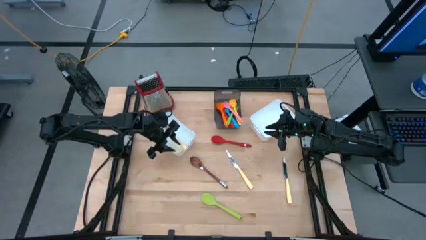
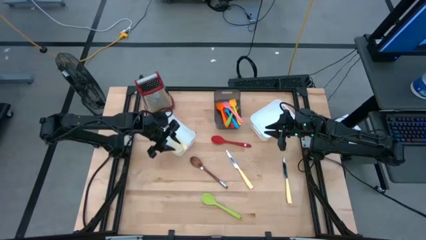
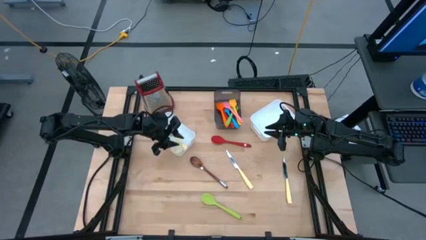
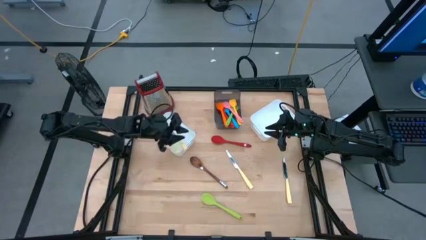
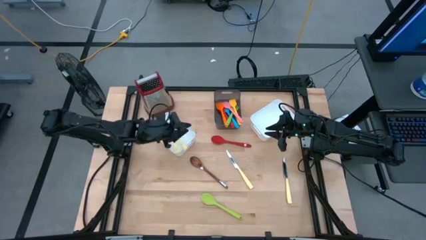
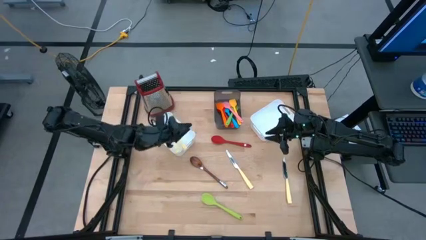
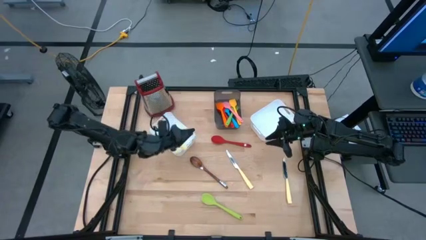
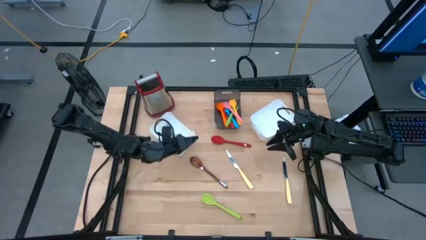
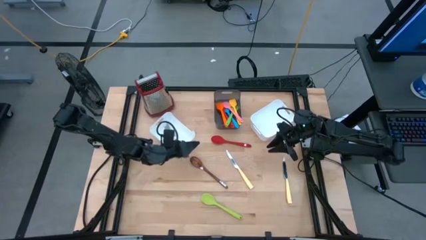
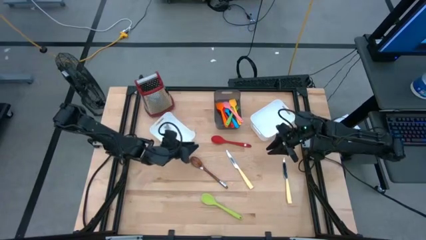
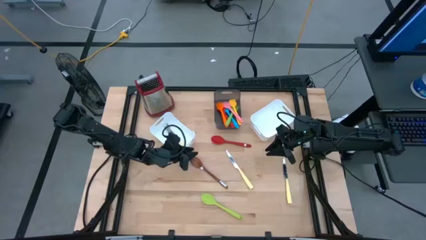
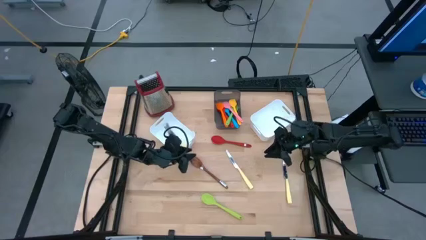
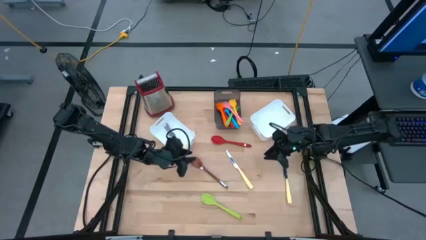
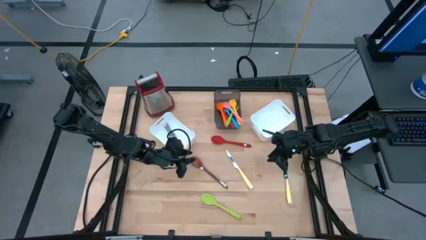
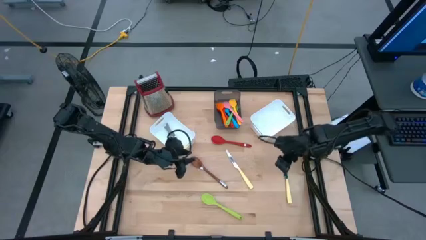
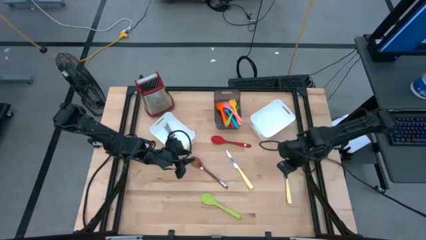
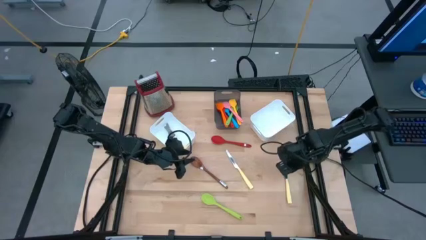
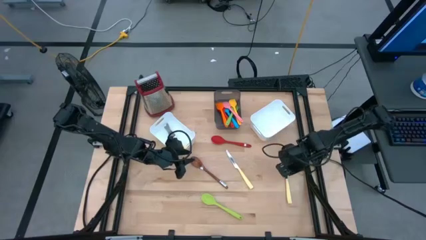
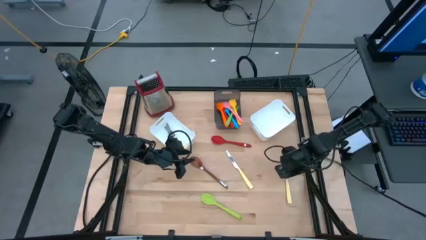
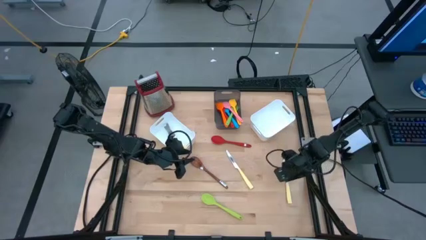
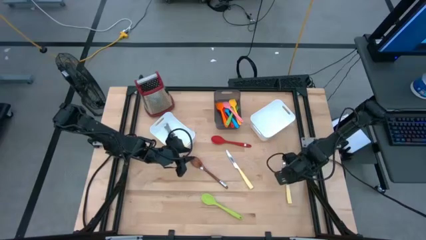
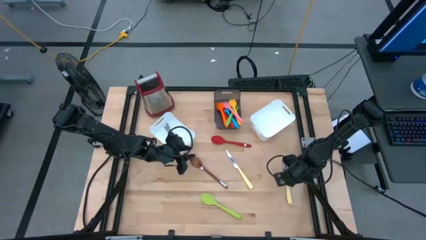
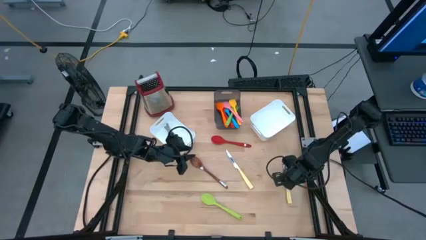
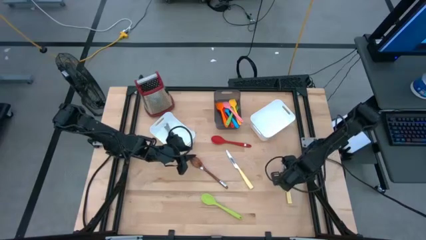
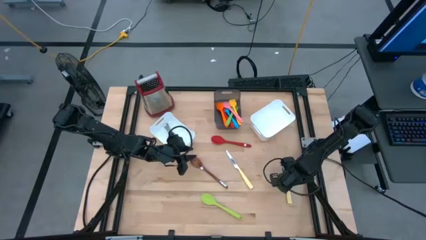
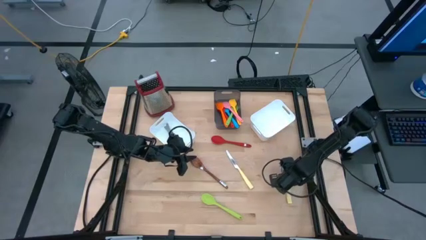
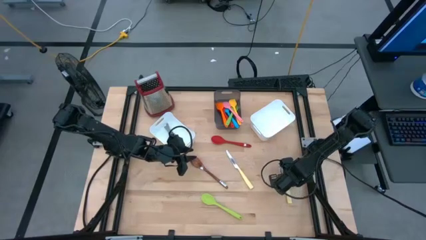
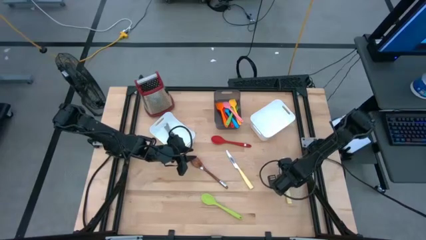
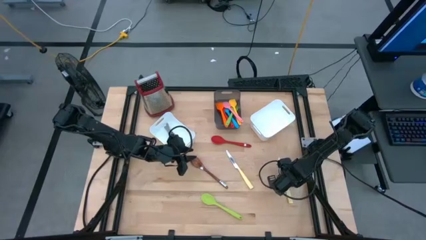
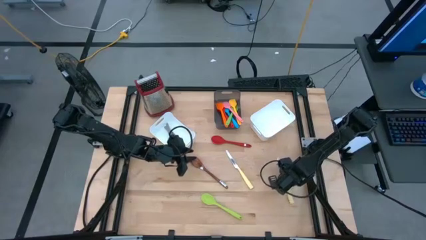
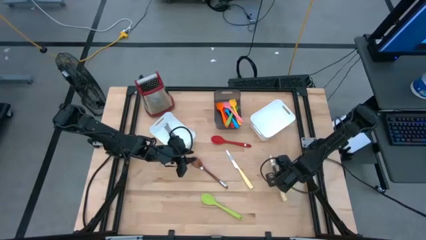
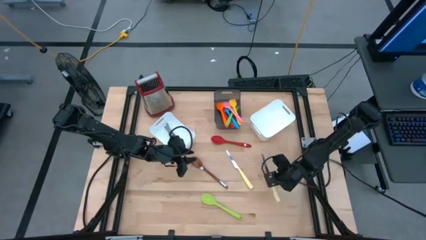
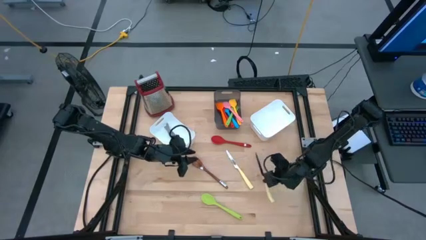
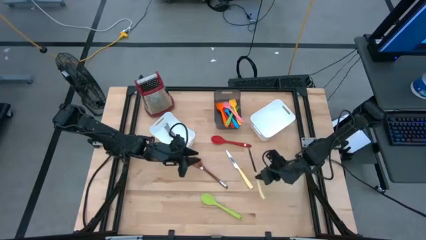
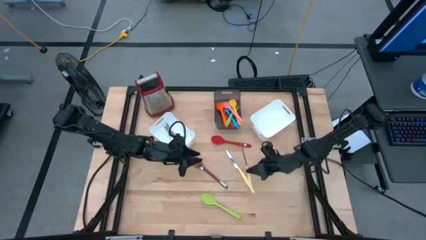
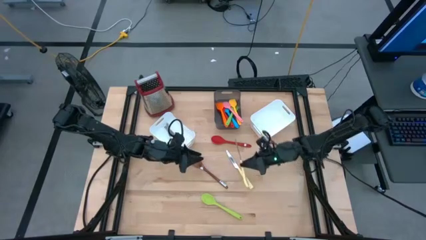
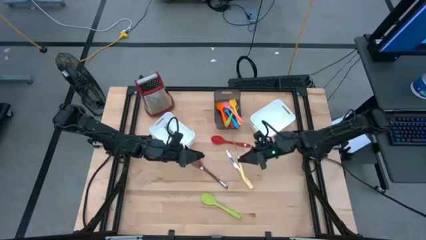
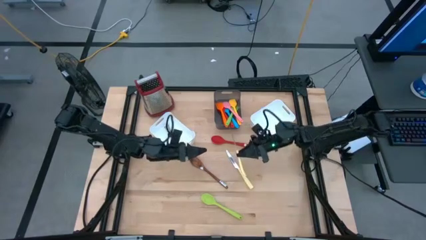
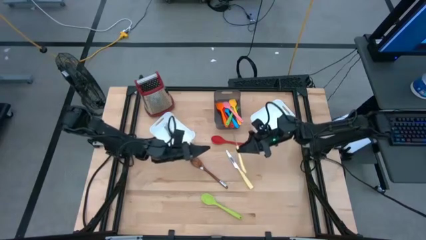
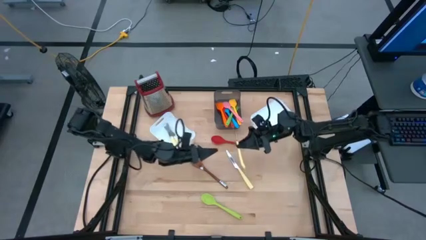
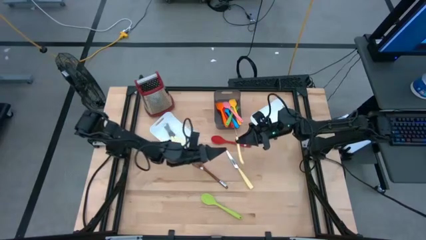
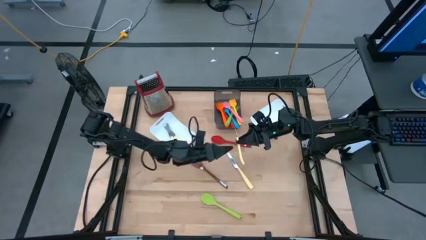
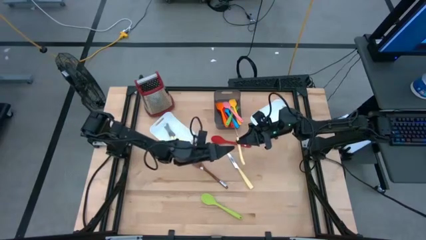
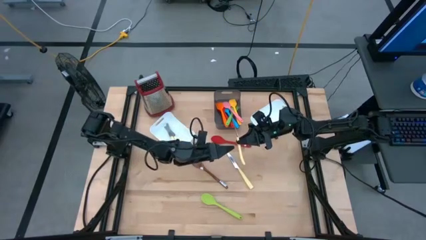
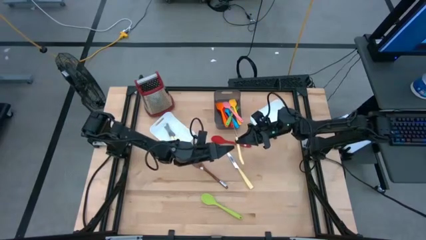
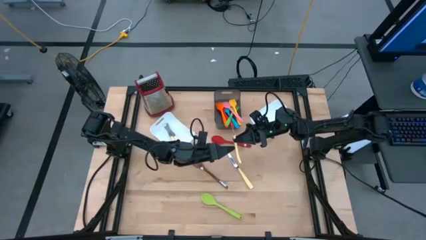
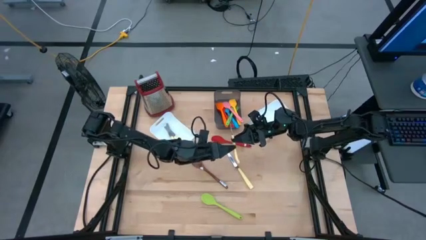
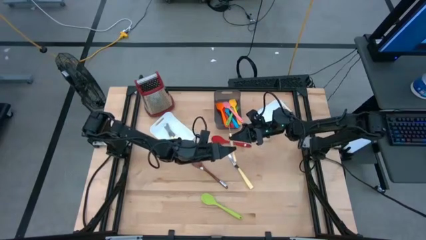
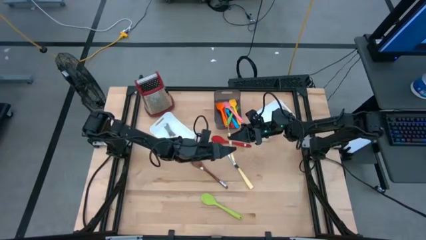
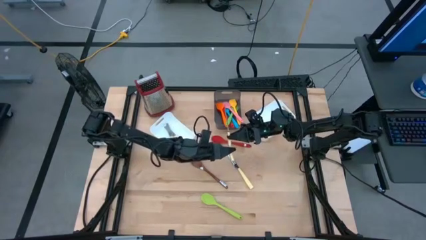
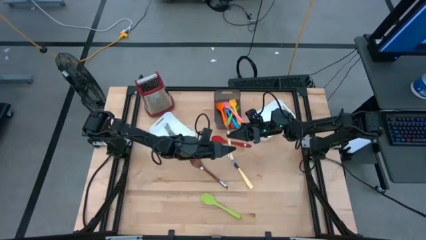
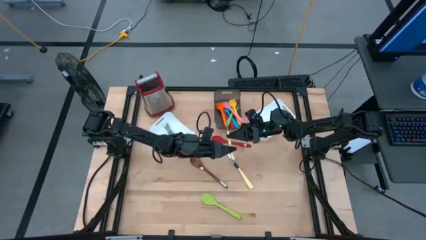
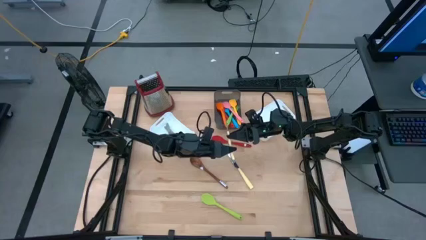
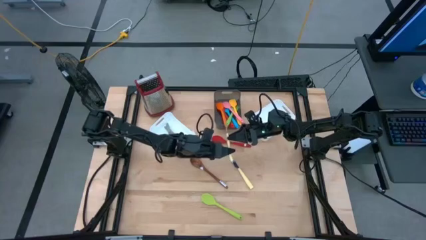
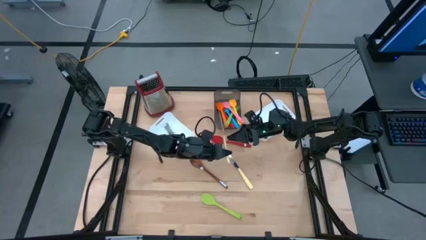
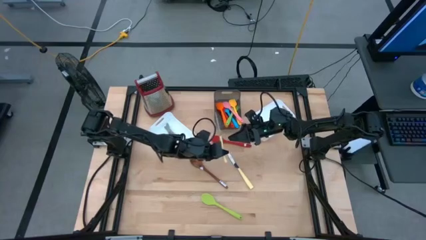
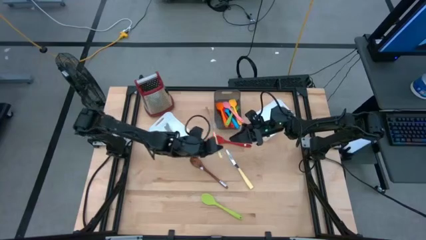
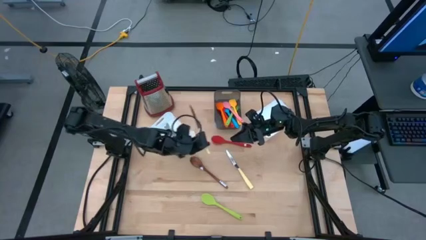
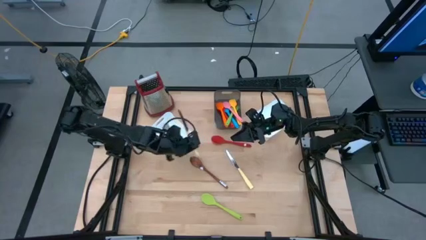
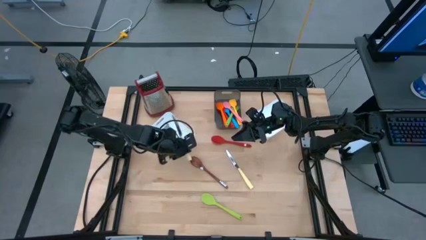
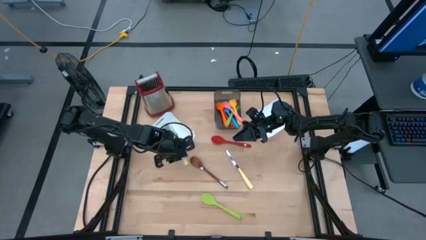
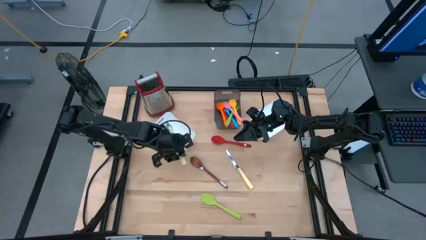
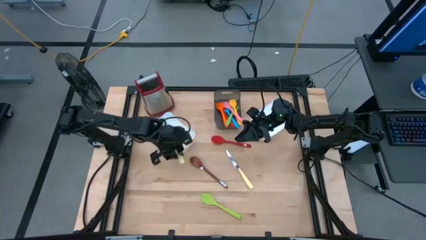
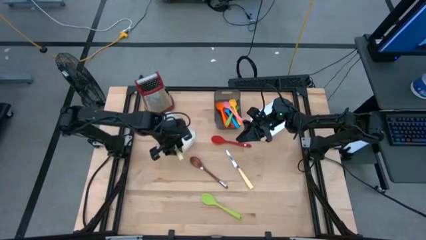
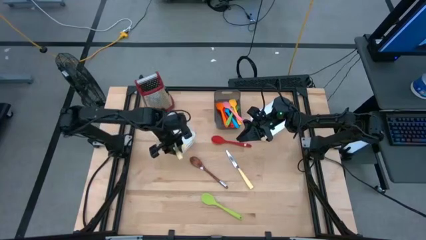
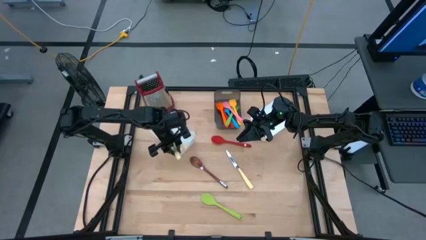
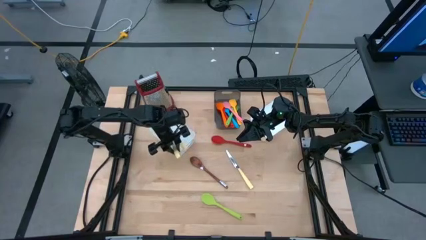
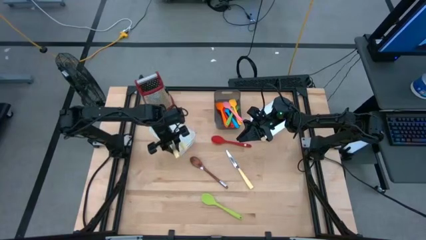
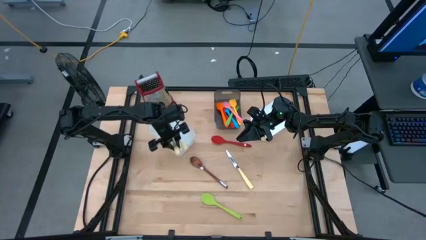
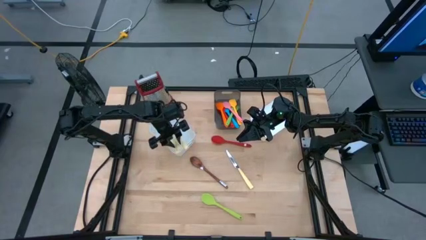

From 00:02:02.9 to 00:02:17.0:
Task: Pick & Place Kitchen Items
Put the yellow table knife into the left white bin
